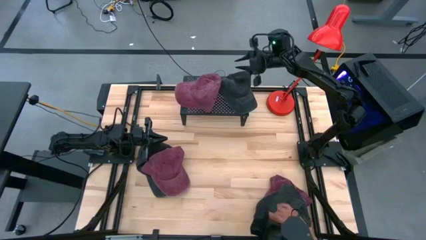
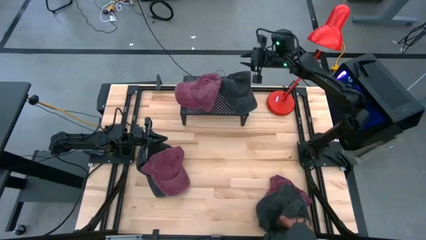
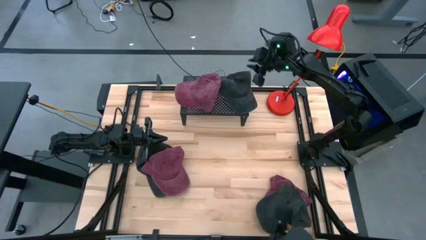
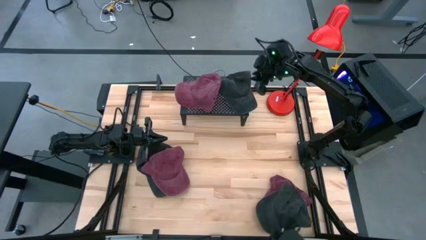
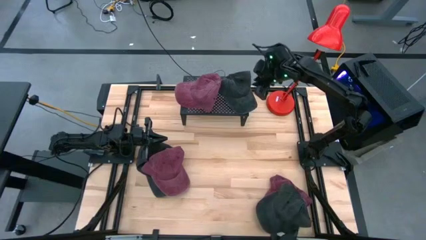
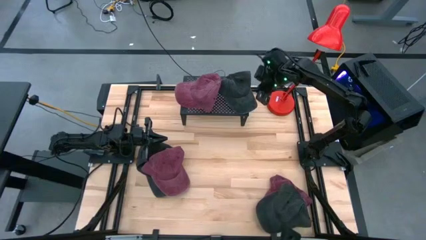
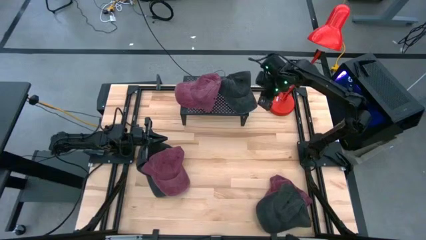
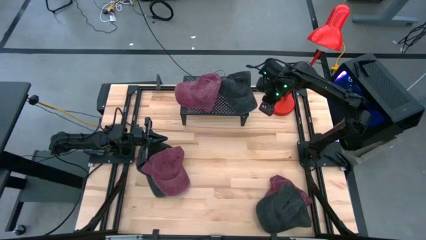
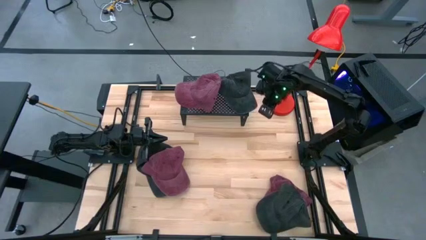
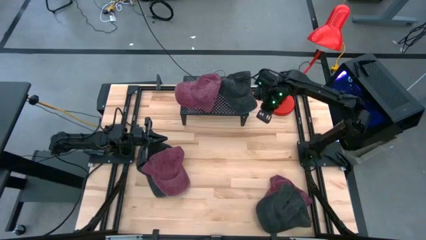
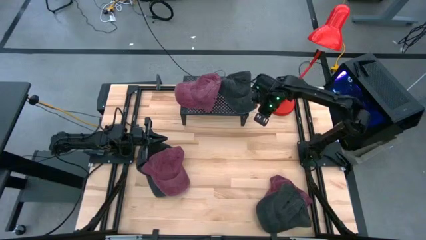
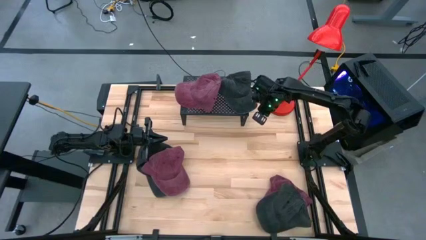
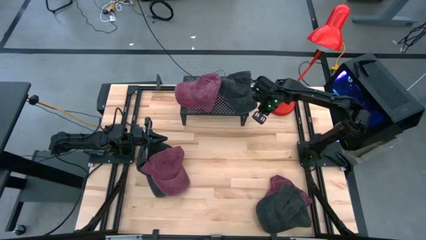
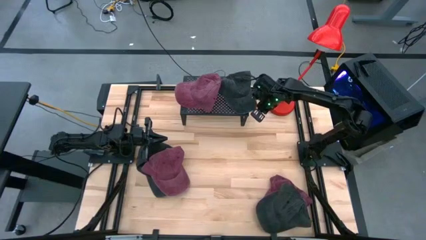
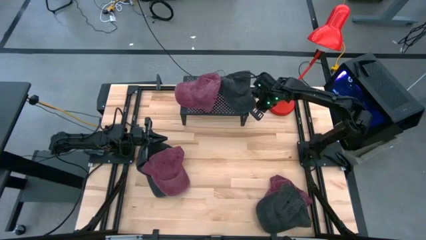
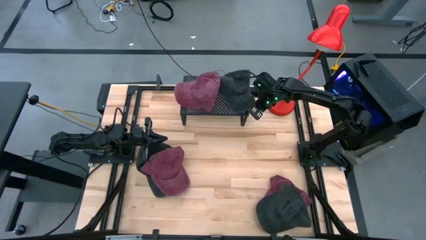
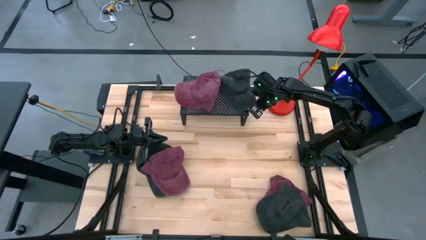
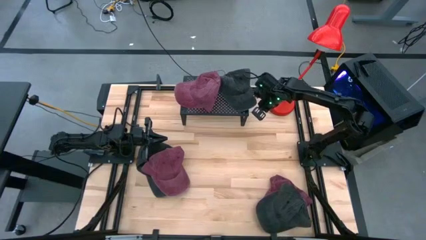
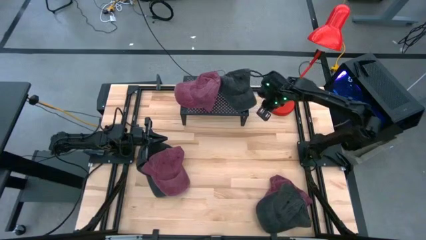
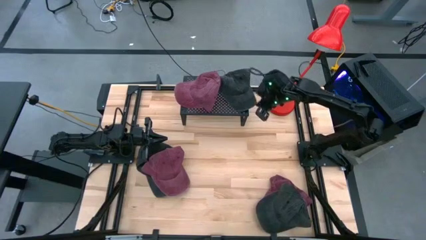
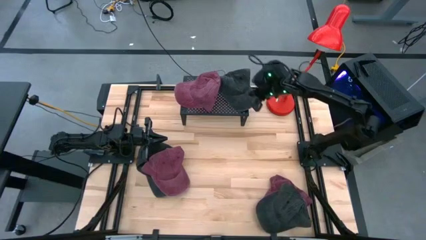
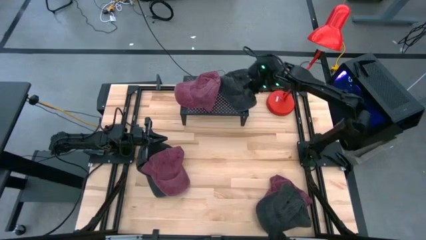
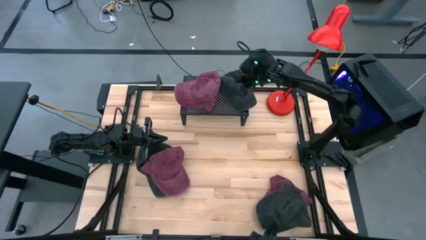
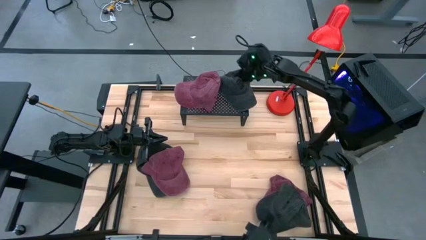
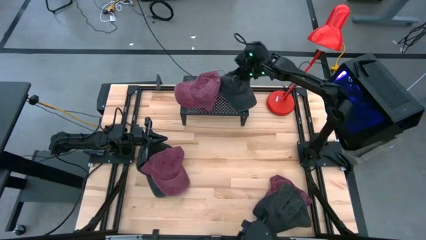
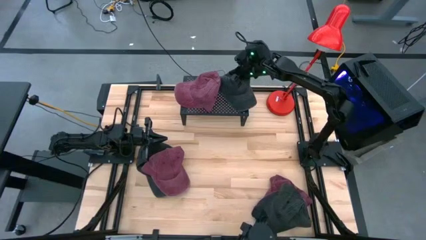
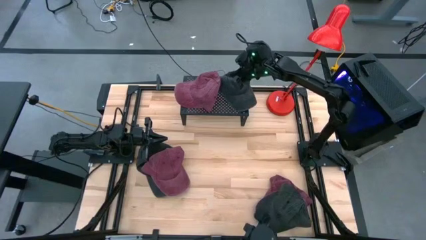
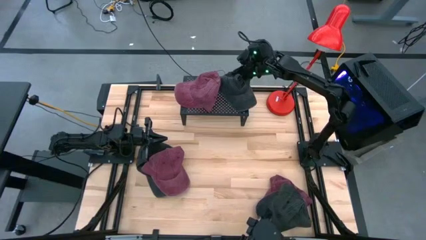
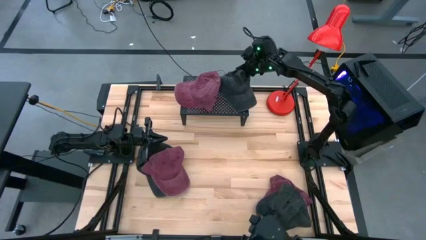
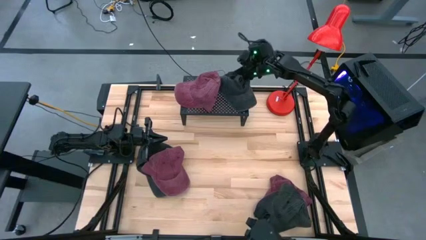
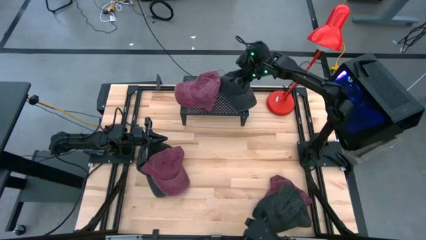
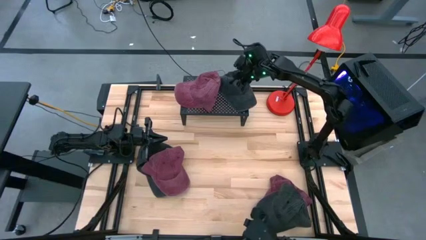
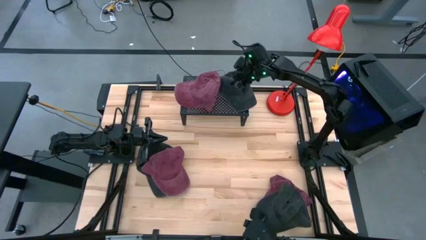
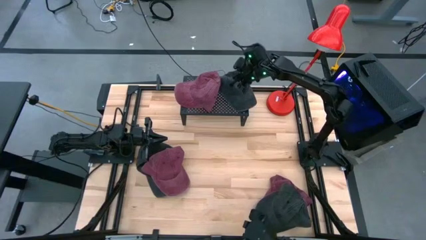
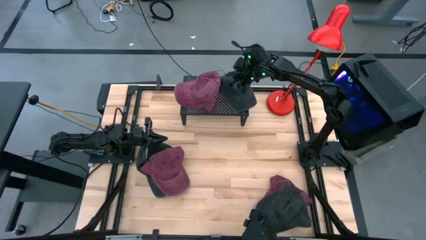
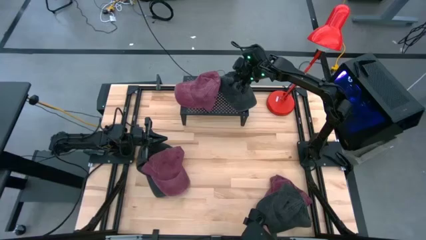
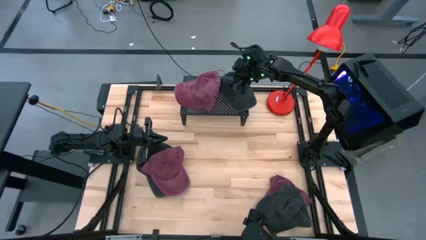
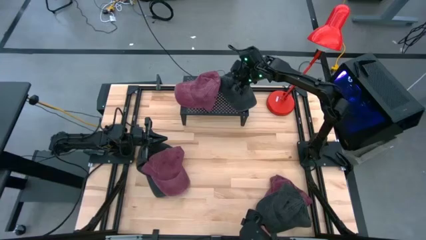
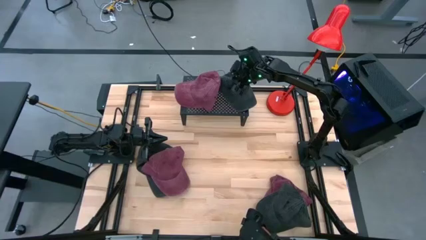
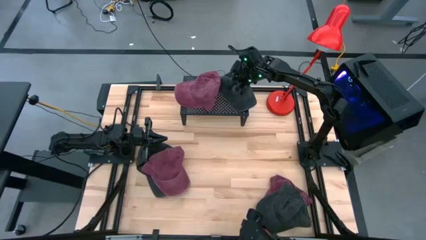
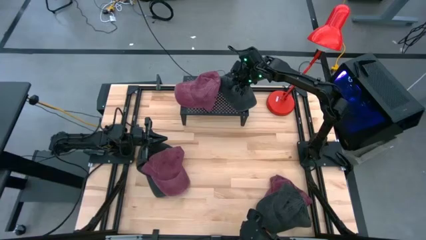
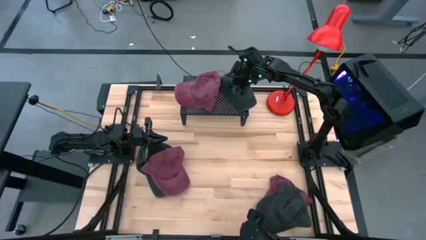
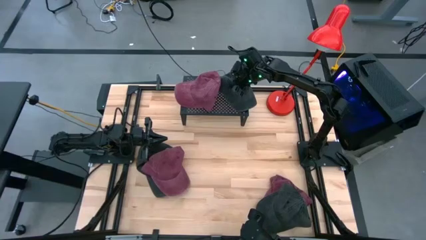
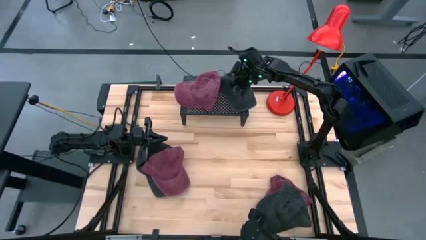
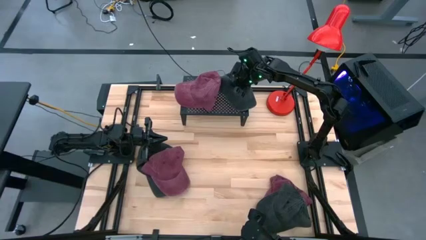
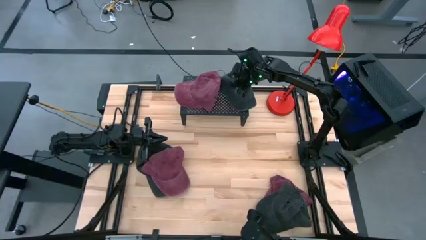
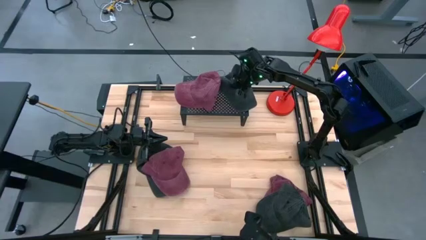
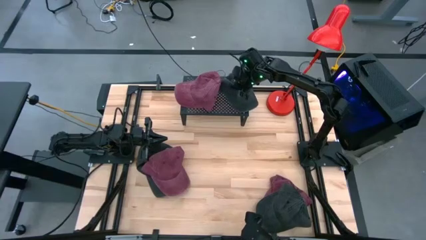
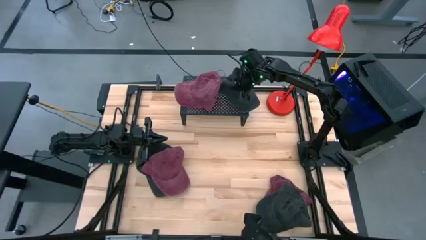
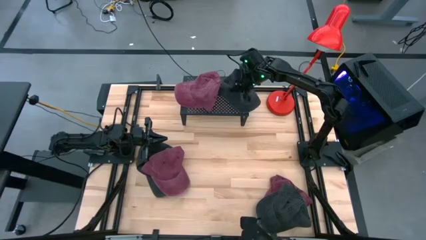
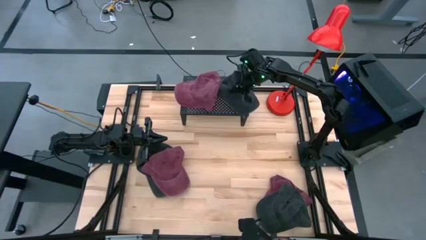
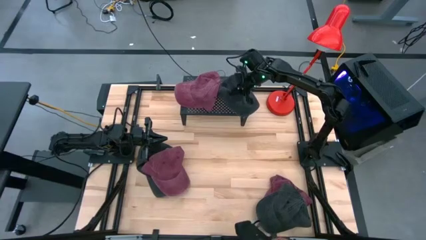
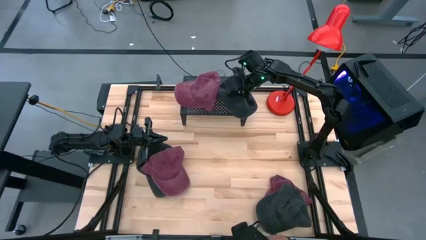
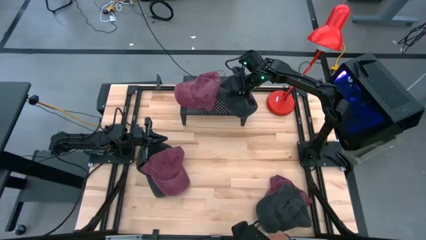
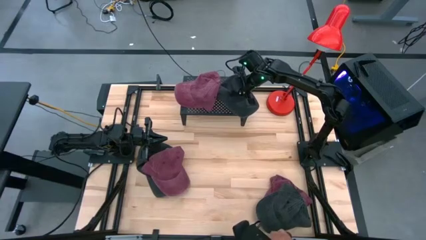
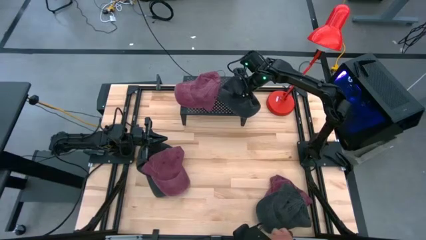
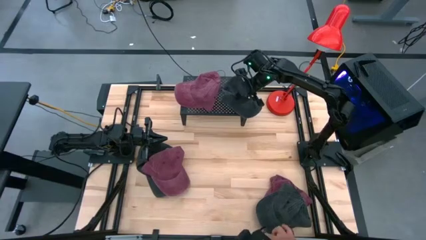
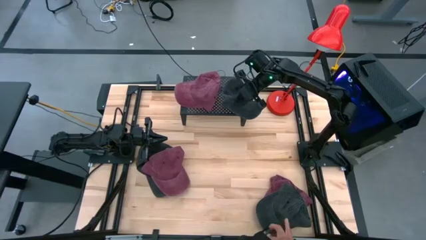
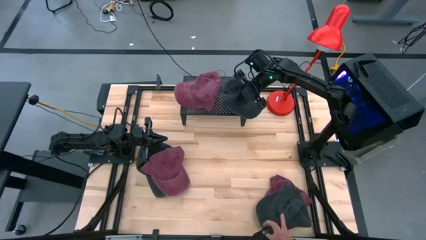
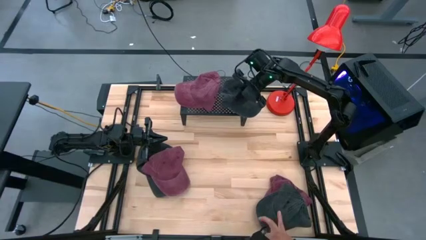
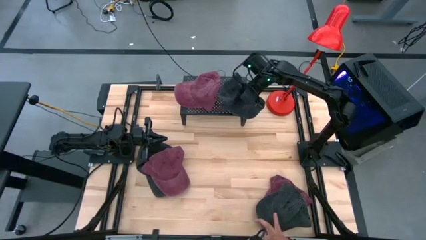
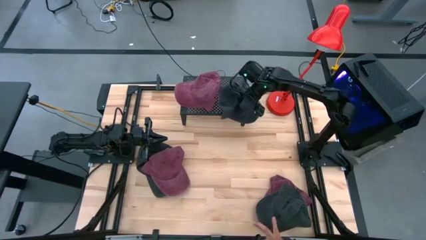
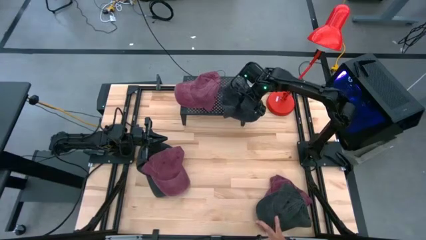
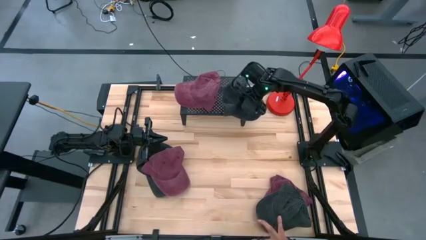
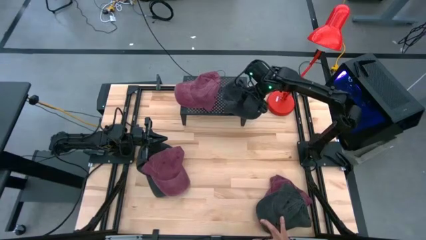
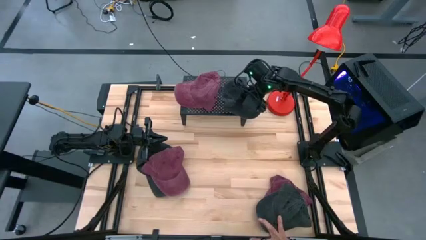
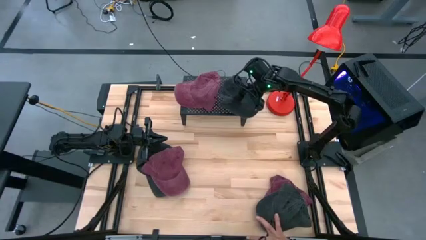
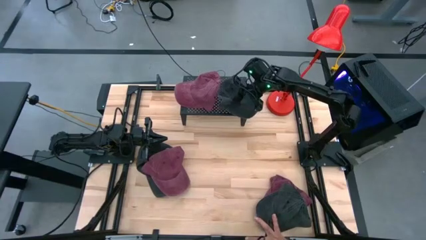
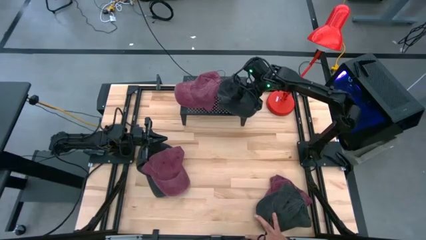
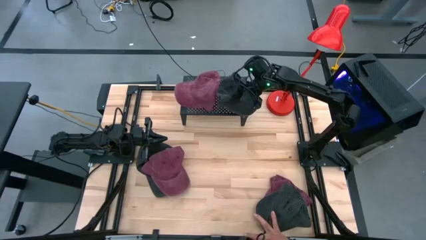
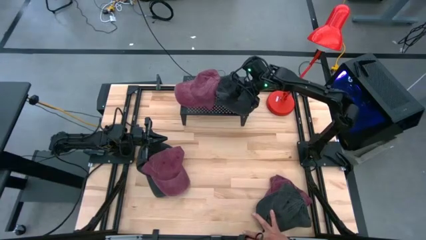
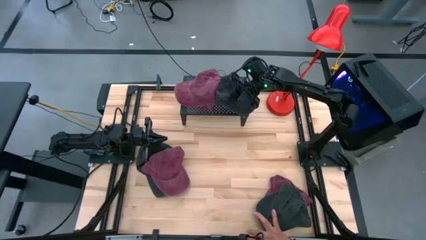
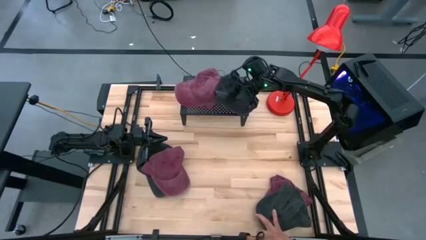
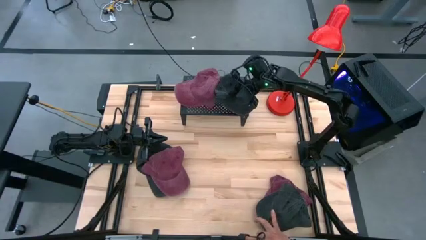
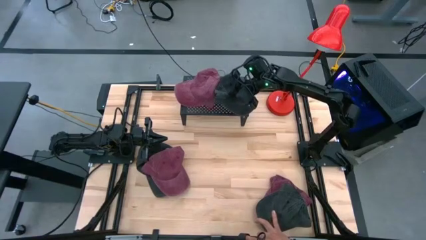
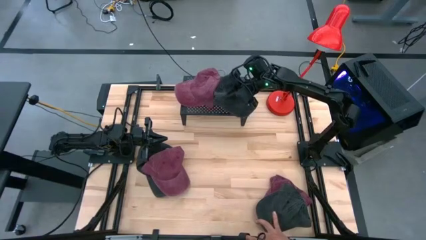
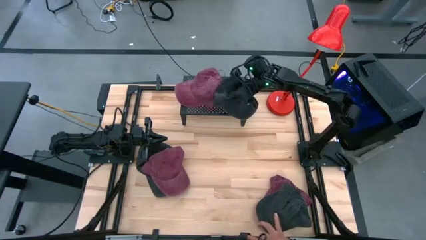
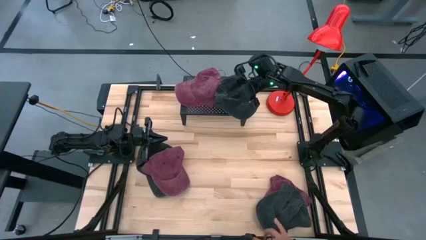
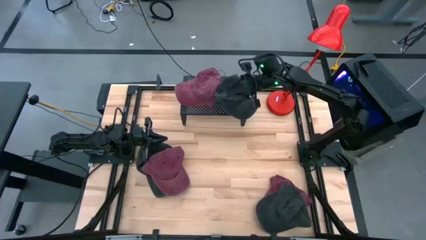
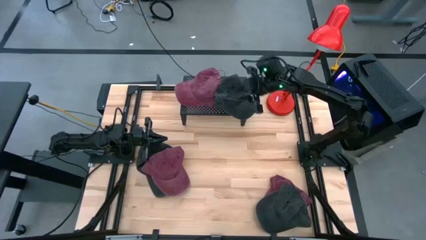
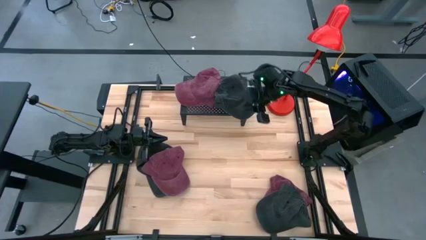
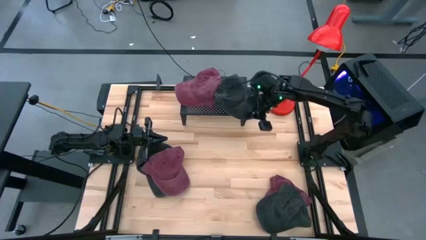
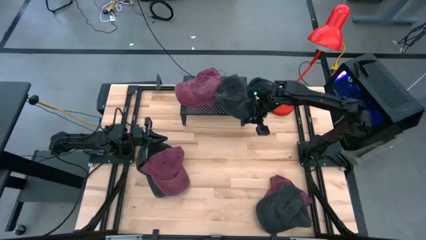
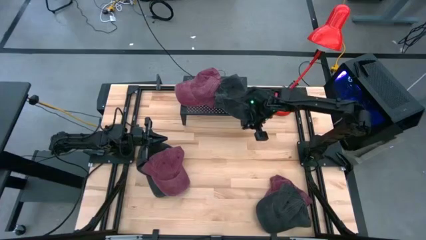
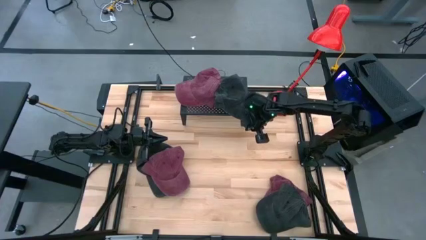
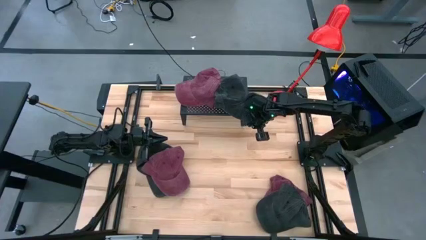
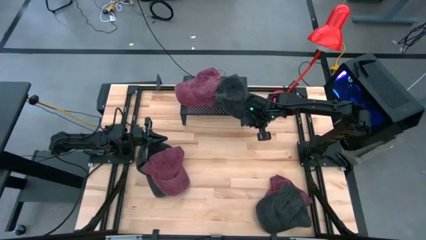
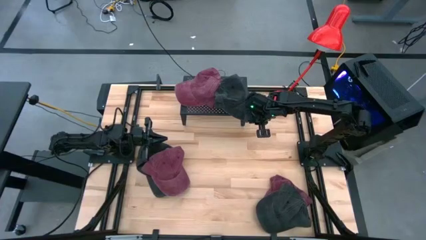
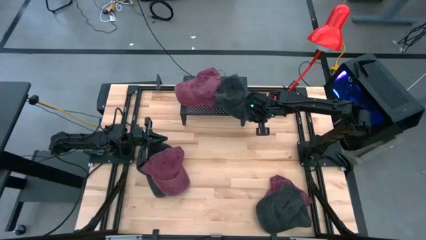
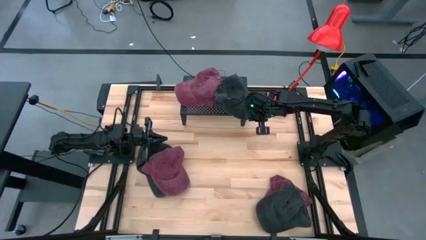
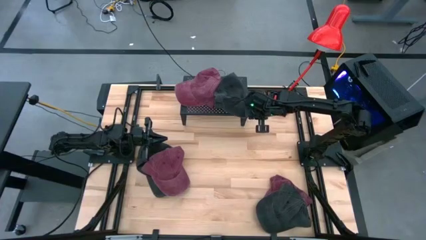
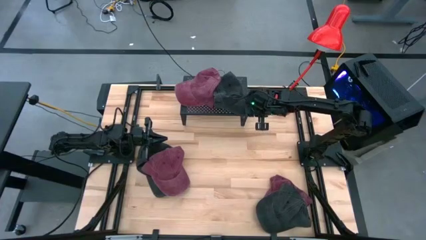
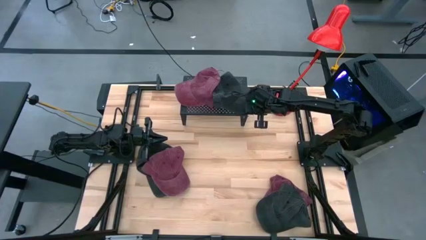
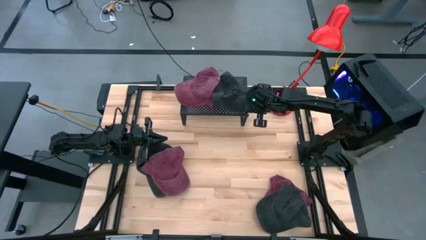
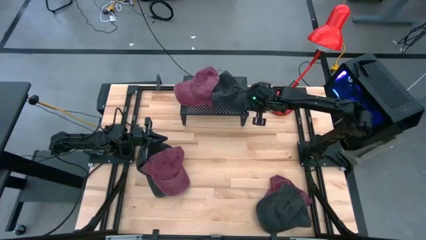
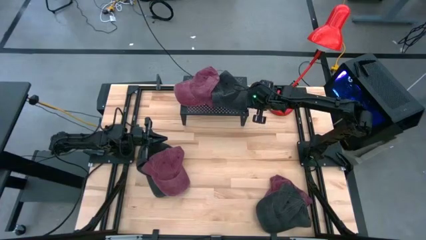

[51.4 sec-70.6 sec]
Task: Pick & Place hat
Put the middle black cap on the shelf
